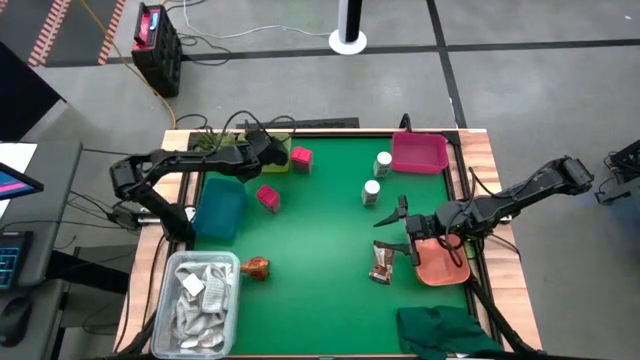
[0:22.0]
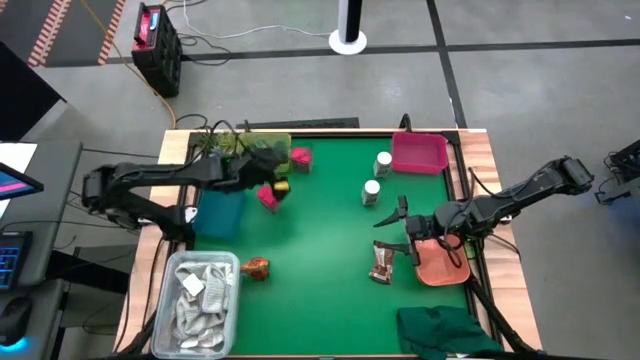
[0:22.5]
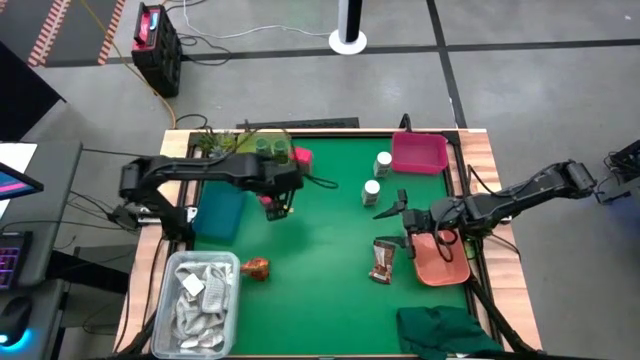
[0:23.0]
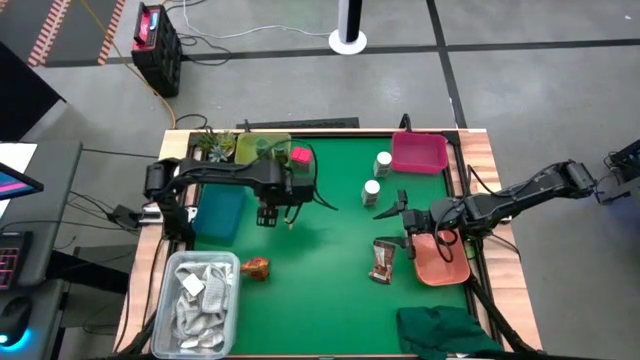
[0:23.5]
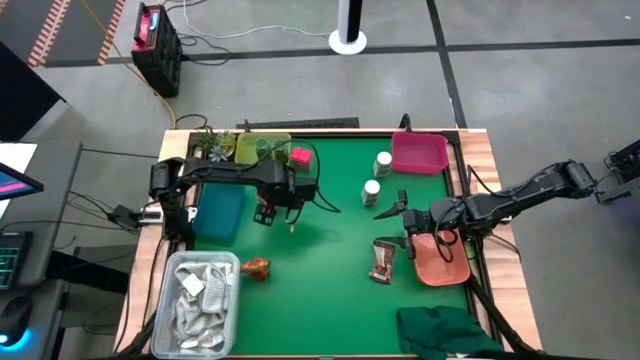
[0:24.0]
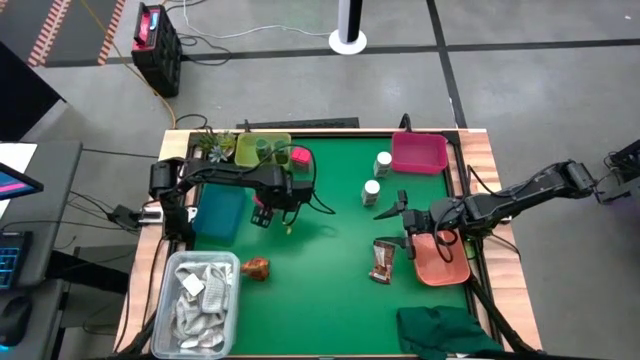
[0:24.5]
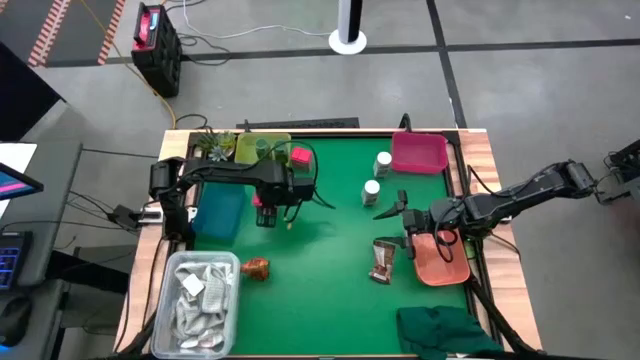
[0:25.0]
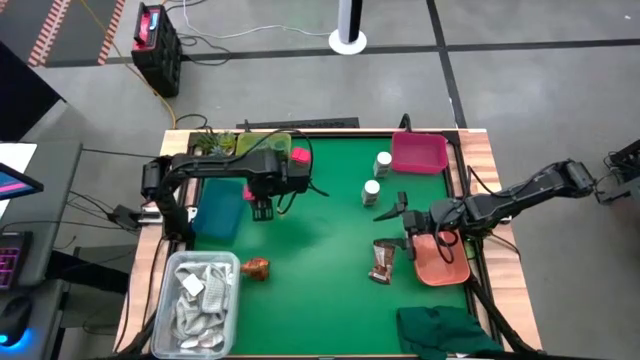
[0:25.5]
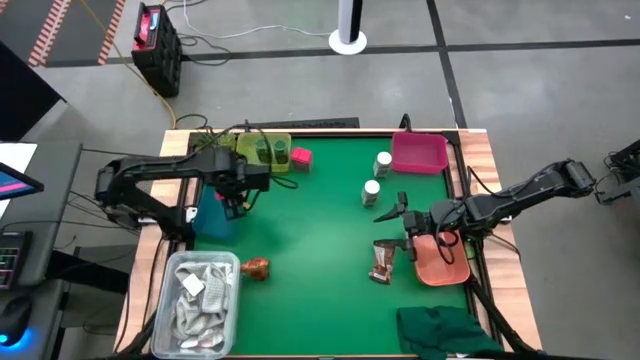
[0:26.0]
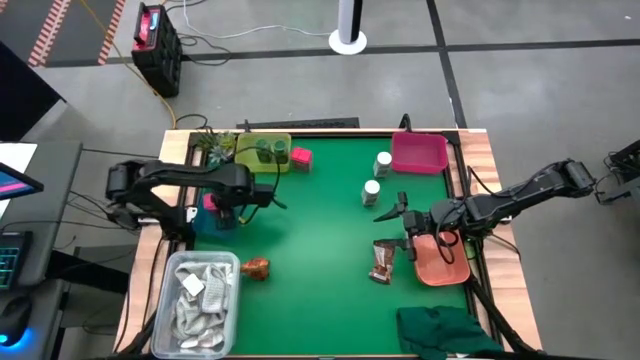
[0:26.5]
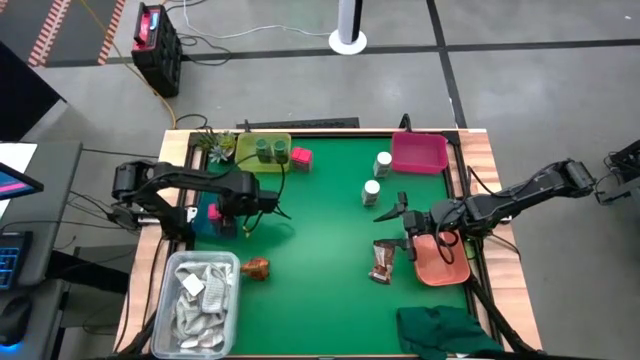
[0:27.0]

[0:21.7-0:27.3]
Task: Sort spices by type
Put the bottom red seasoning can into the blue bin

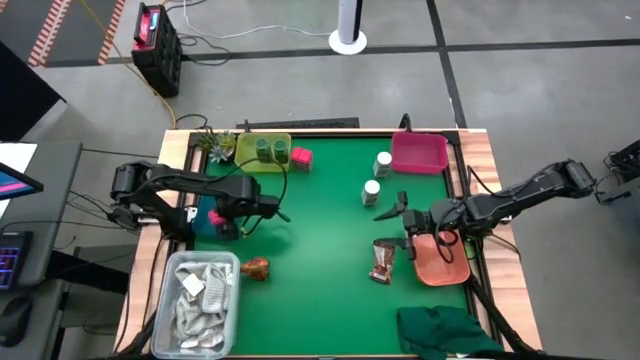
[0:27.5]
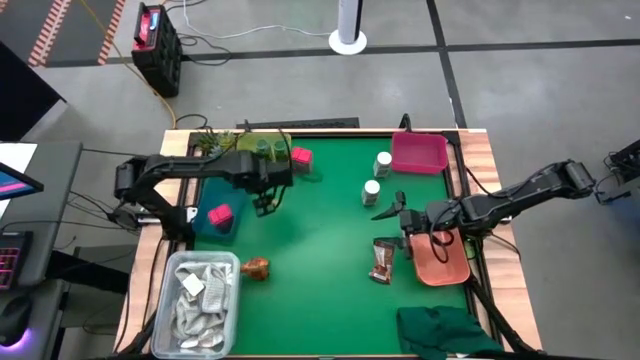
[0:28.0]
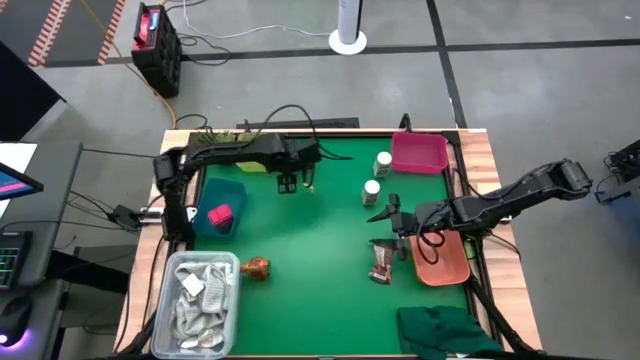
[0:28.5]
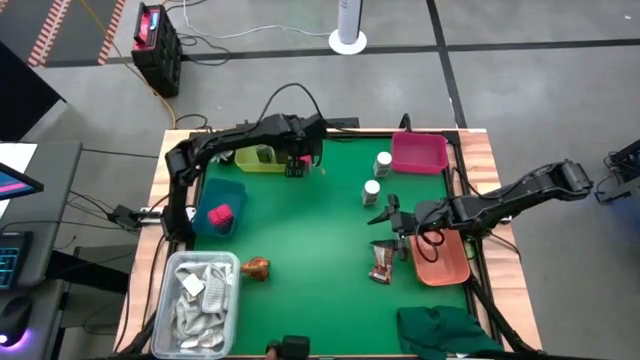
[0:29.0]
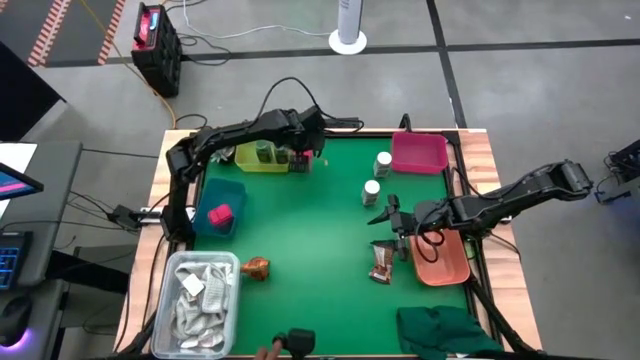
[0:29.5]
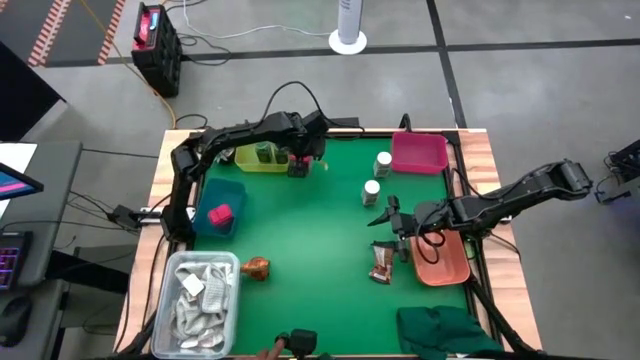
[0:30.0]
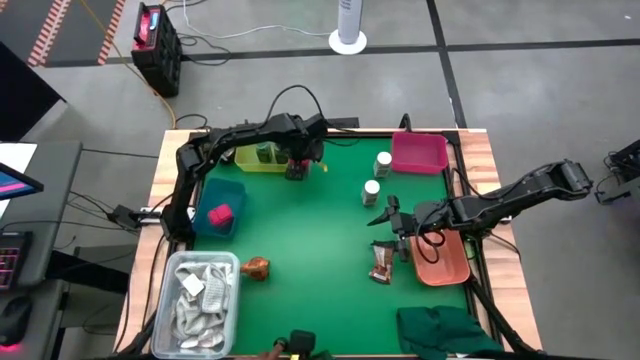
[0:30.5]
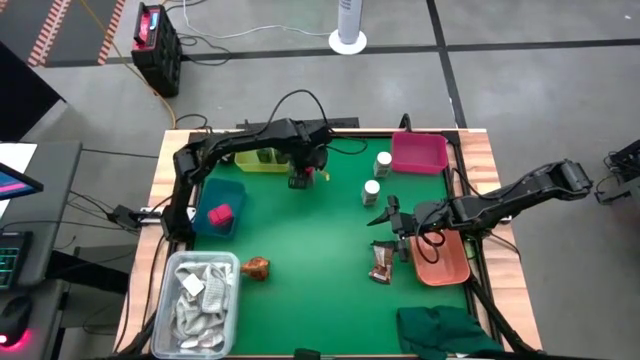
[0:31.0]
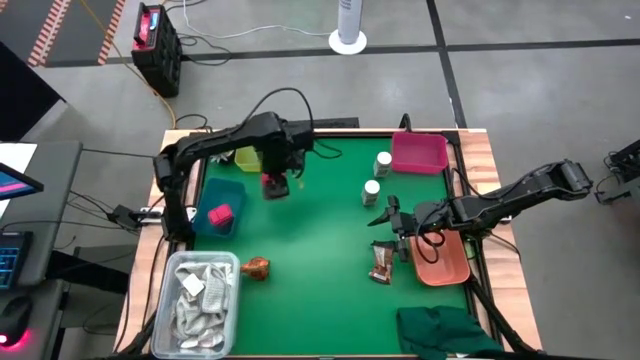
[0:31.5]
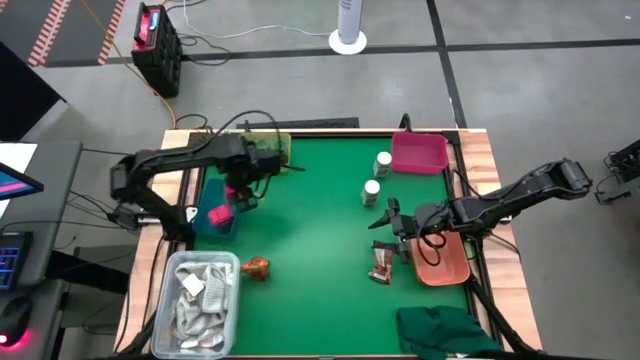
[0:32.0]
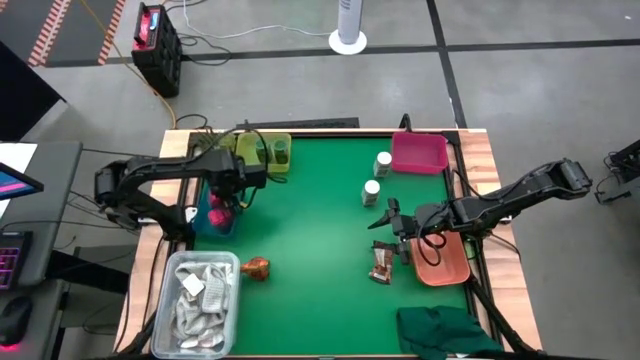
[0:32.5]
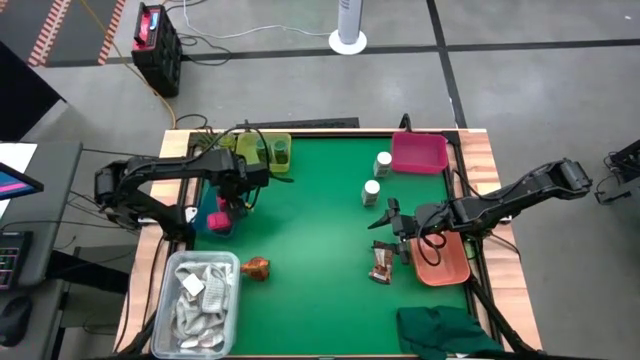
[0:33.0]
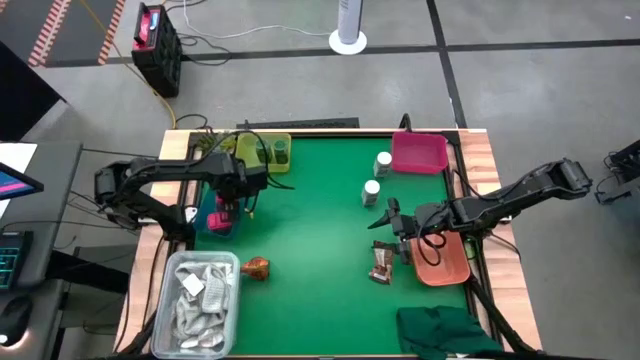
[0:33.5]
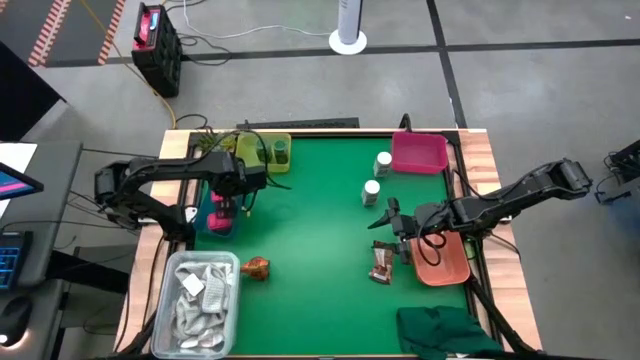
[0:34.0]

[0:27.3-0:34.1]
Put the red seasoning can into the blue bin

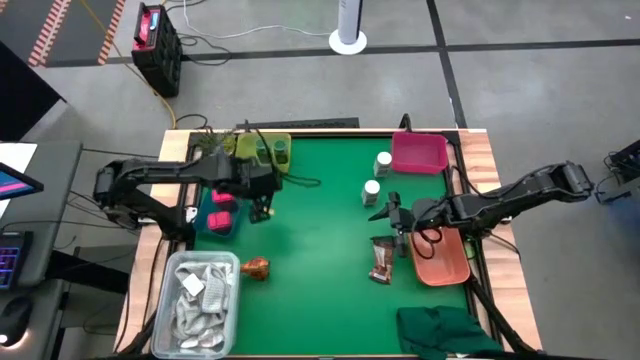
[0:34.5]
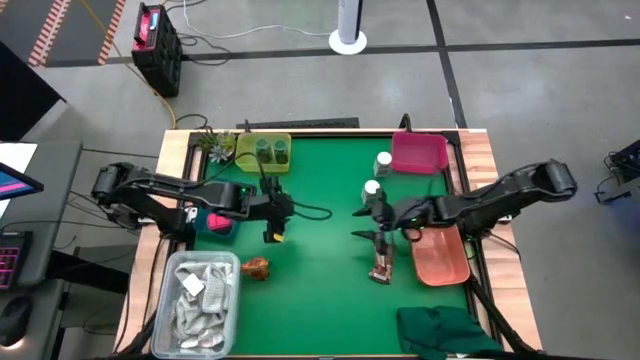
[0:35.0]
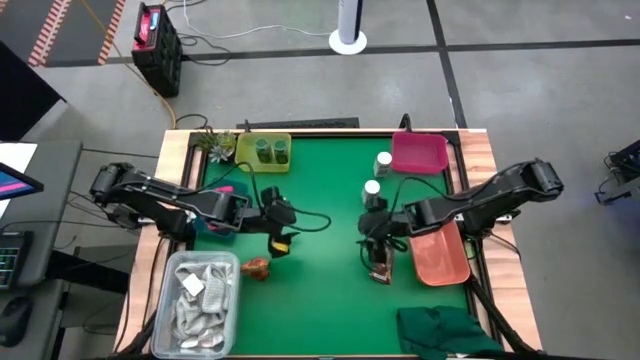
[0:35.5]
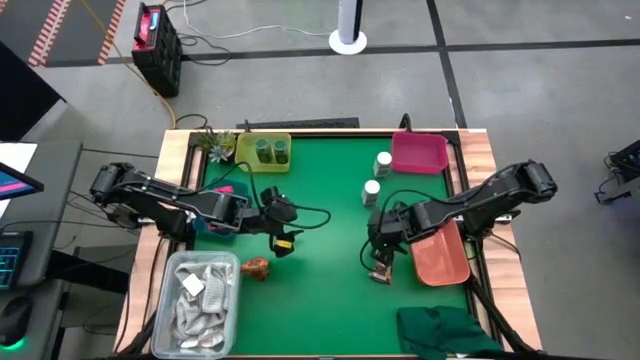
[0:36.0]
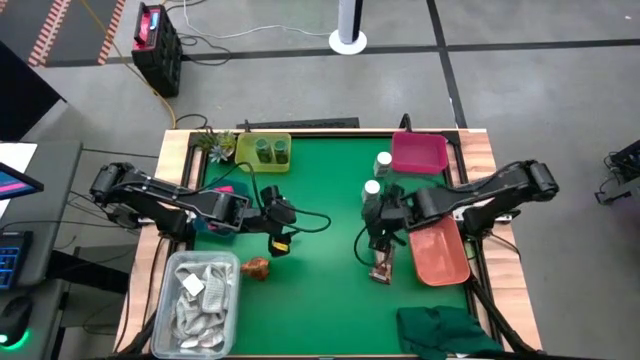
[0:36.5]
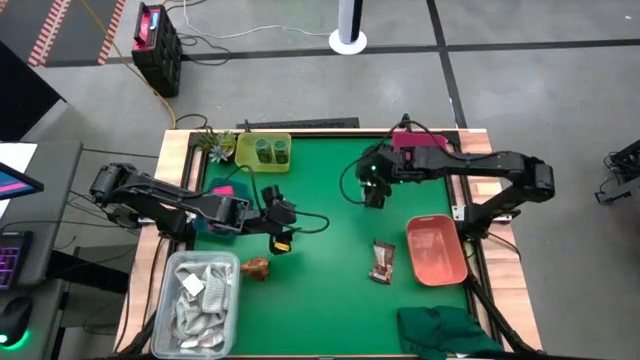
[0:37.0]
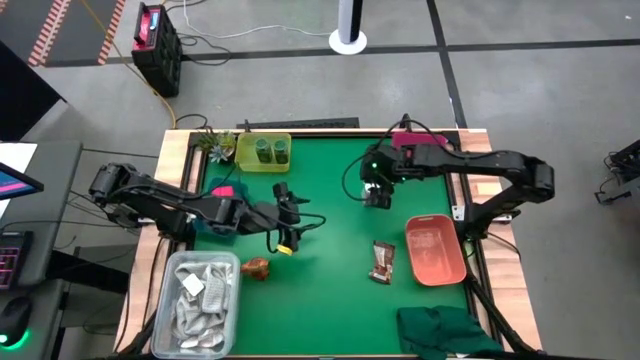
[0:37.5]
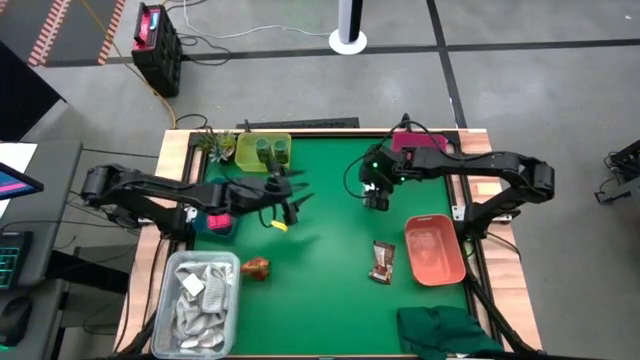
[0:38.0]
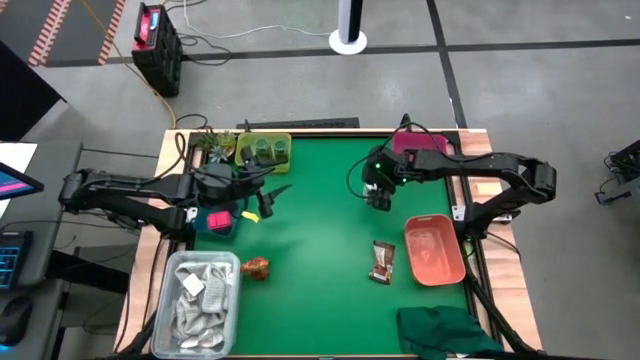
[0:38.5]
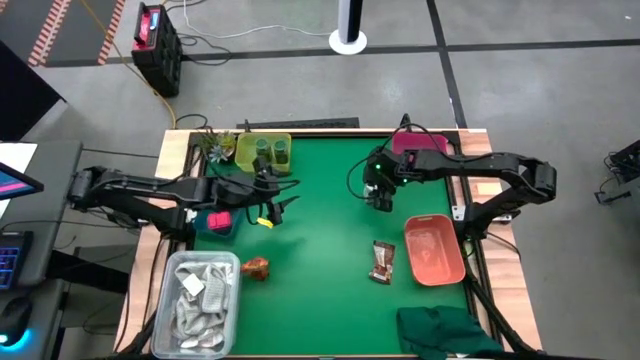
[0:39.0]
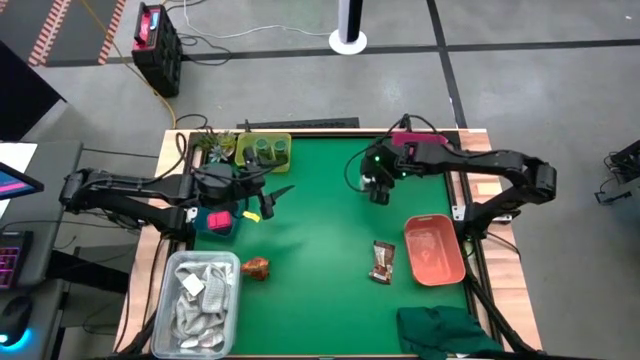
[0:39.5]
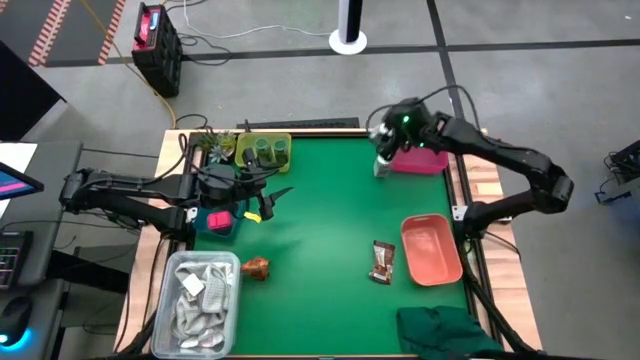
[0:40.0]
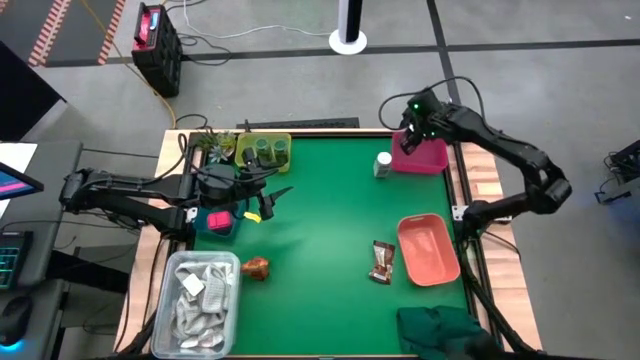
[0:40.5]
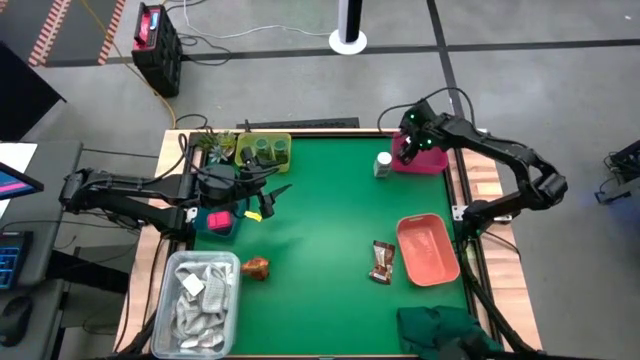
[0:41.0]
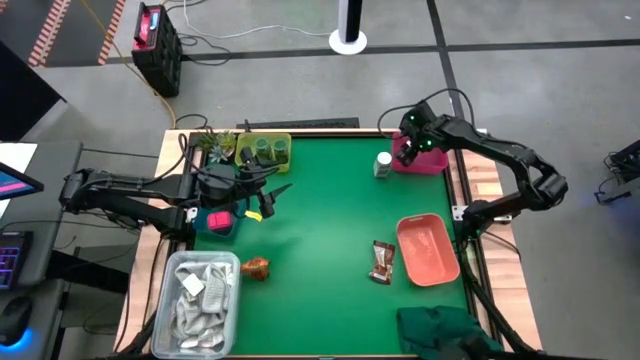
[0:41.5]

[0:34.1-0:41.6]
Put the bottom white seasoning bottle into the red bin

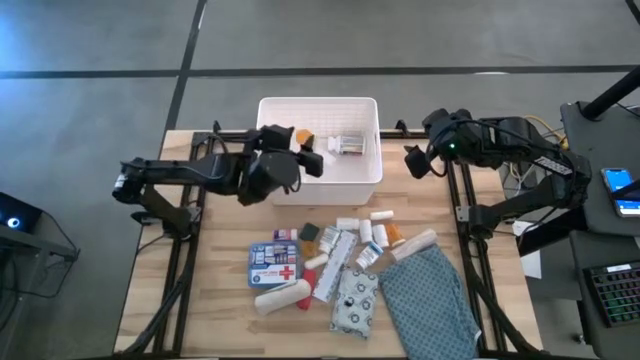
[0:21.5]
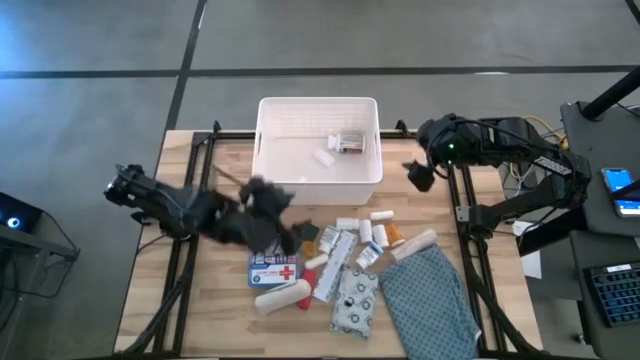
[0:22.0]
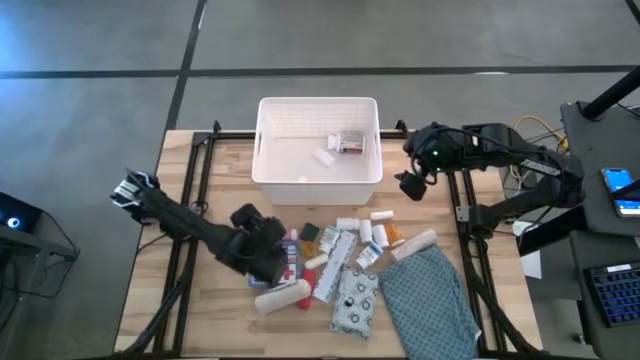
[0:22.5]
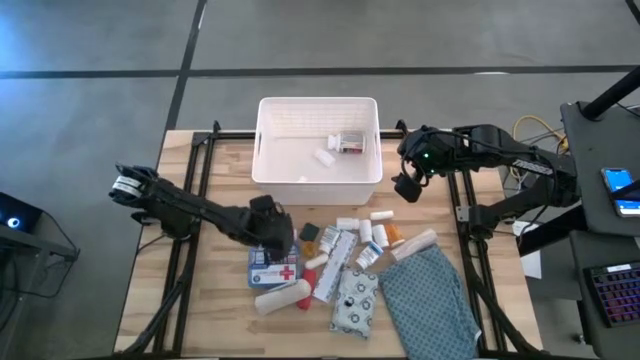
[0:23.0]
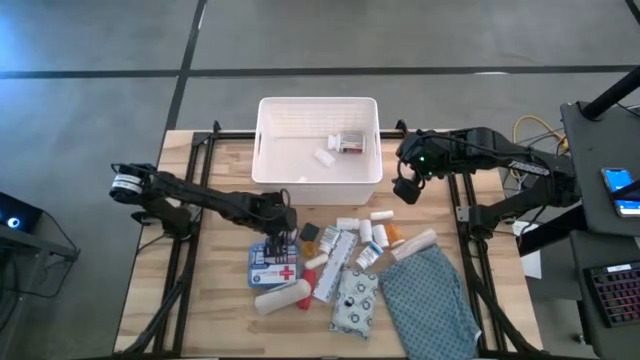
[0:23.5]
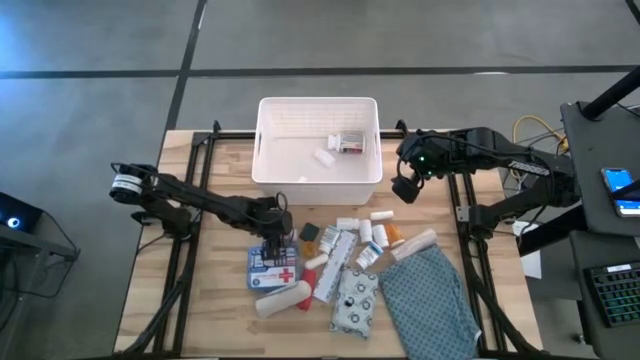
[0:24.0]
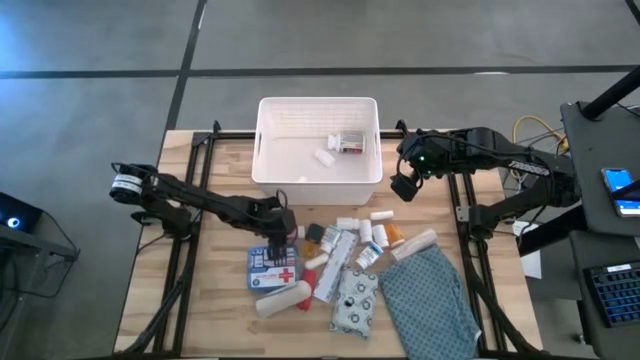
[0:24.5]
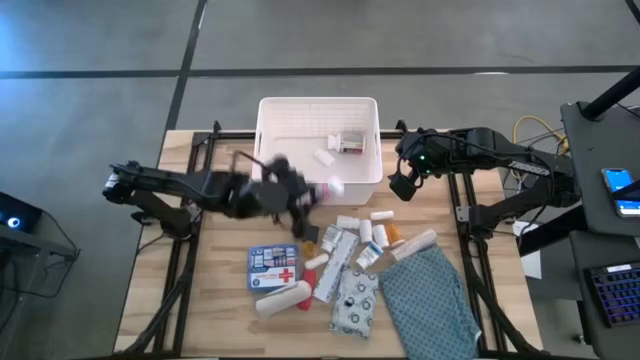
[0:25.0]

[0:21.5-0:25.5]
Task: Pick & place medical supplies in basket/bin
Put the pink bottle into the white bin
